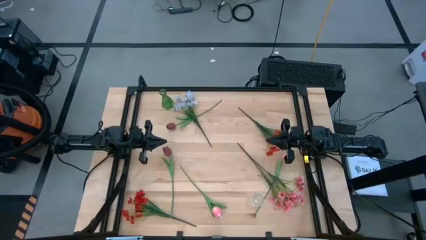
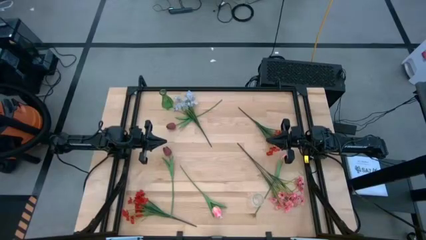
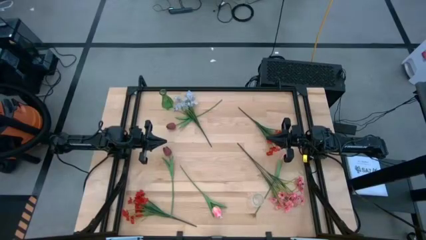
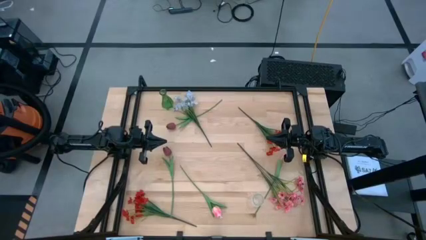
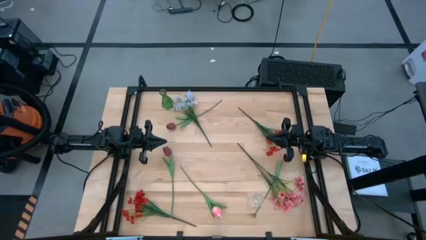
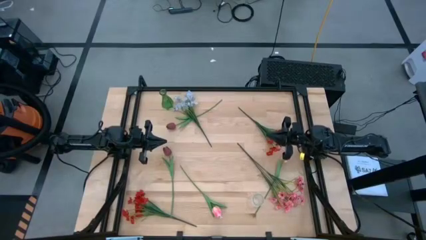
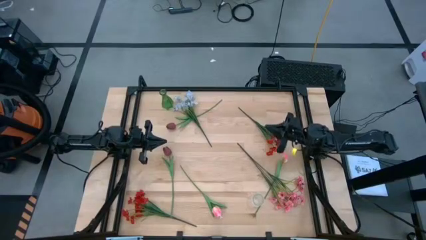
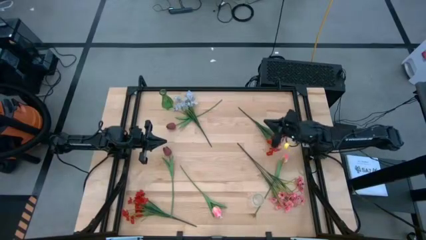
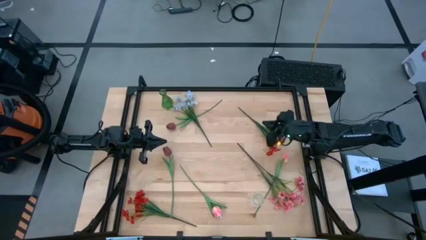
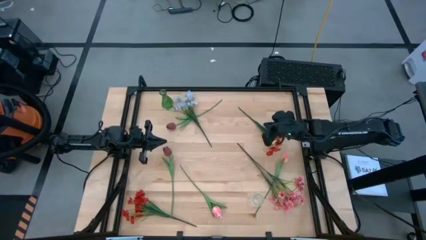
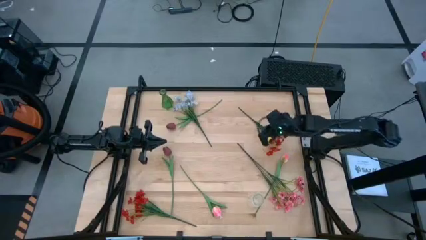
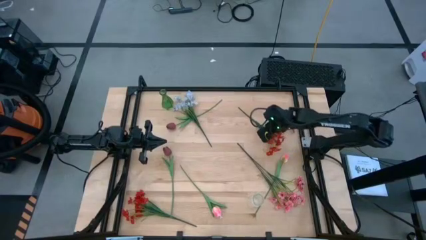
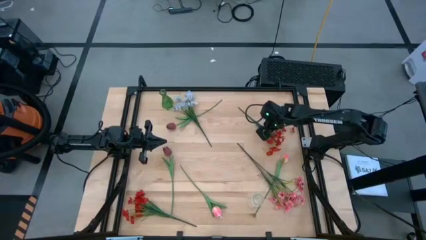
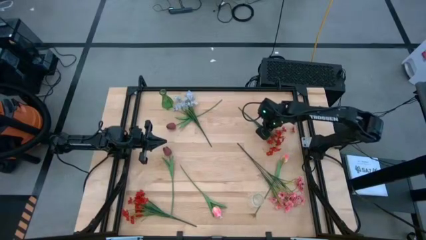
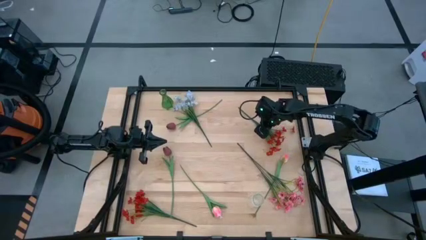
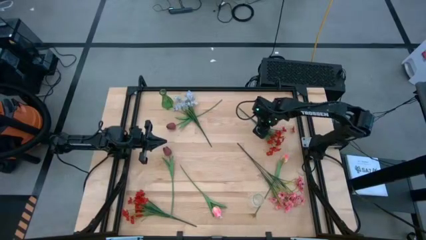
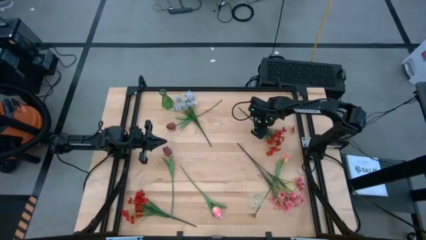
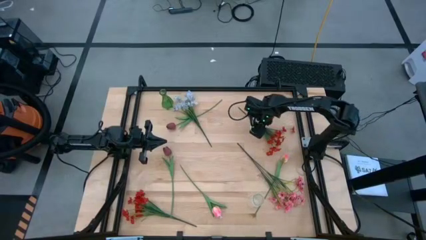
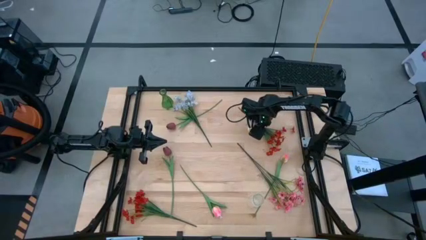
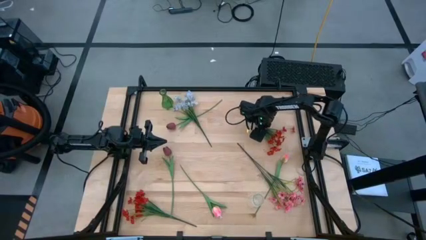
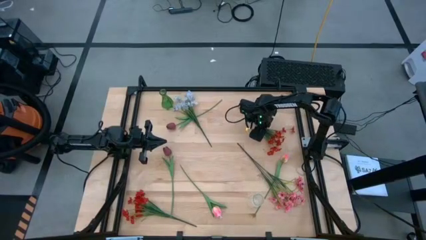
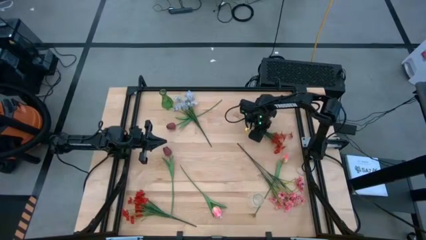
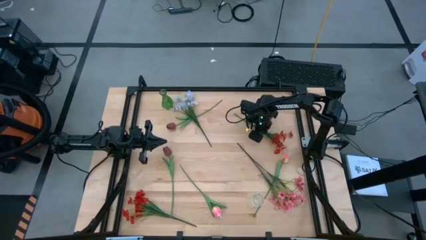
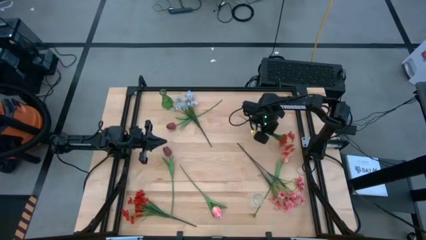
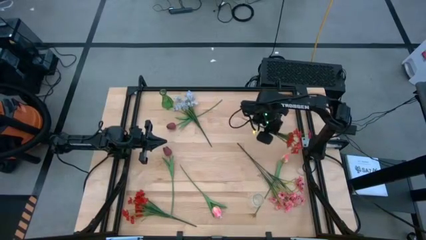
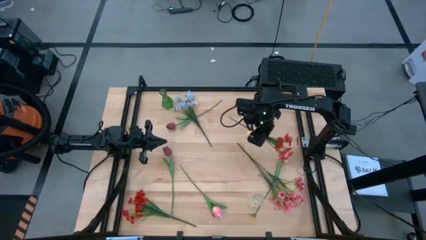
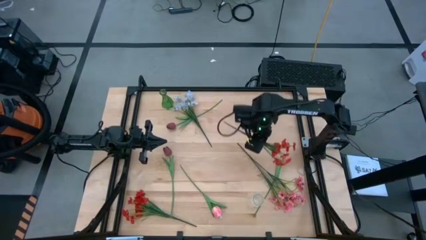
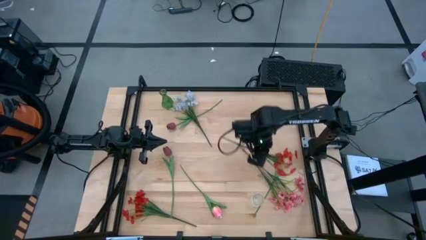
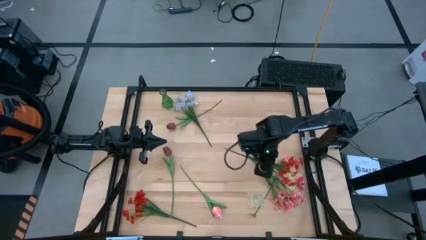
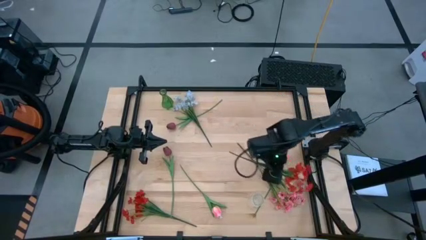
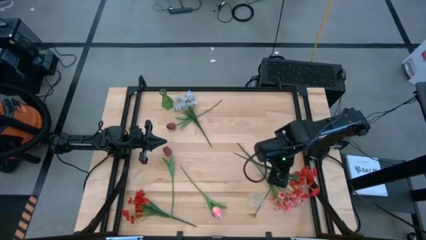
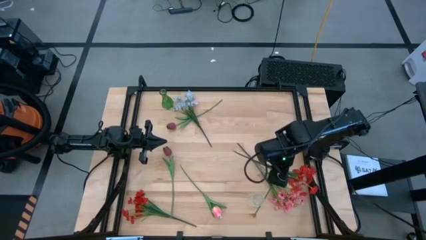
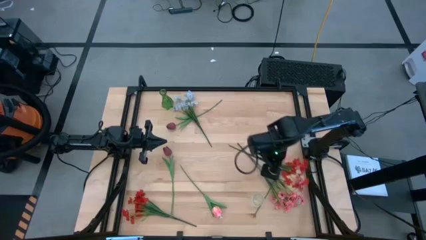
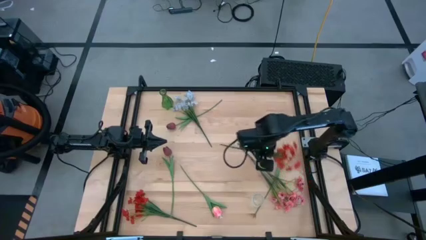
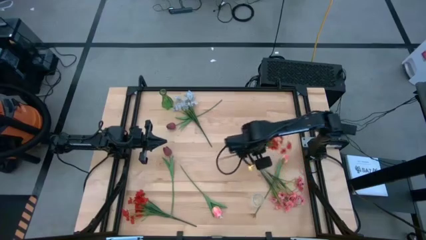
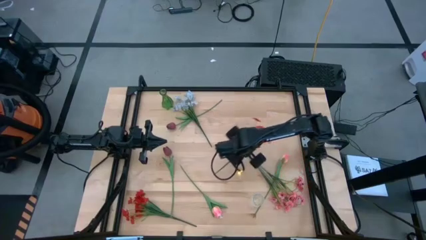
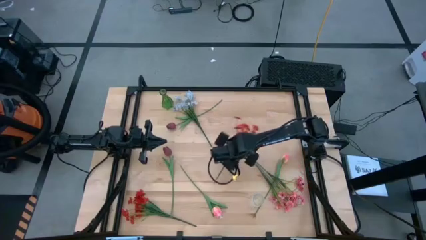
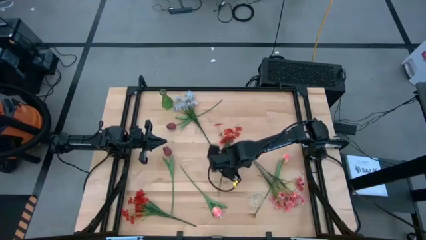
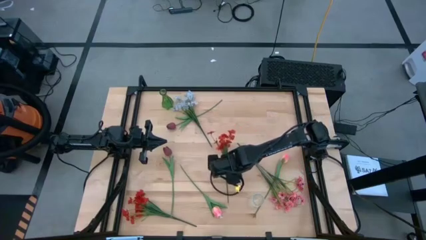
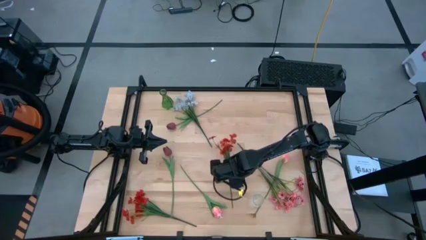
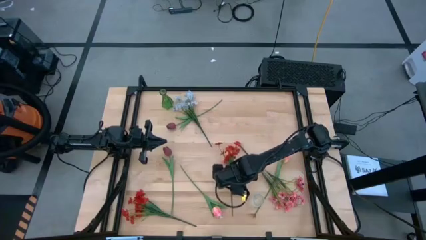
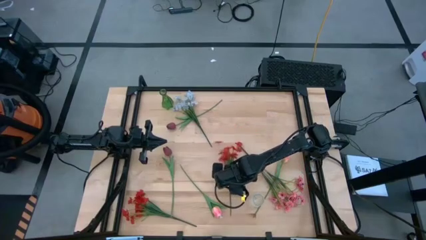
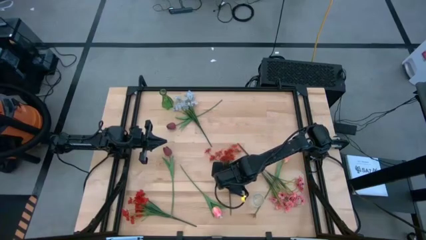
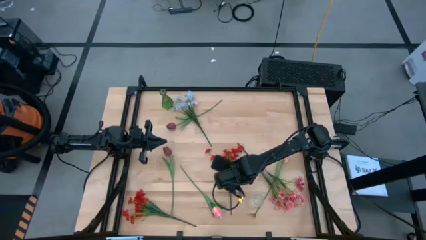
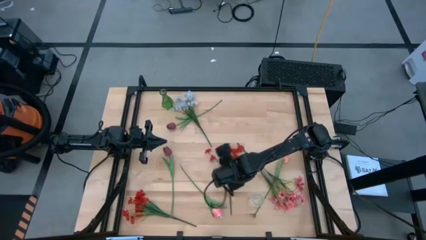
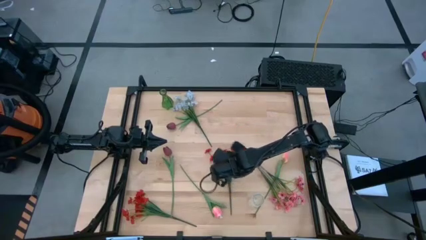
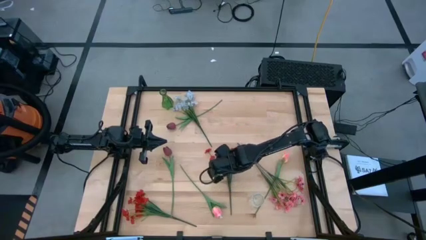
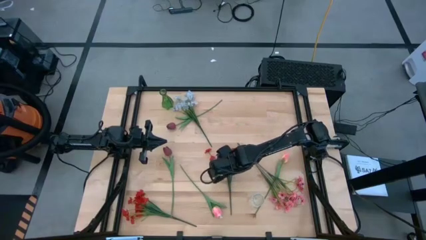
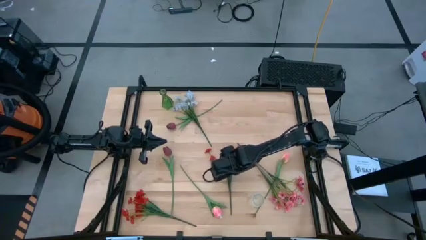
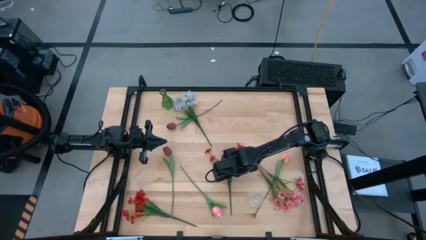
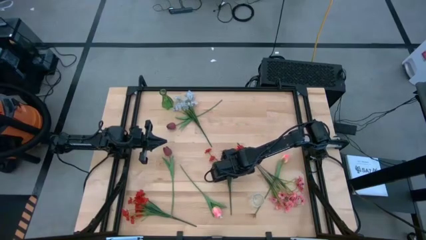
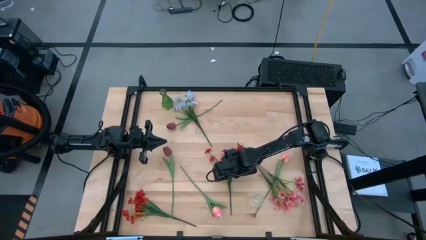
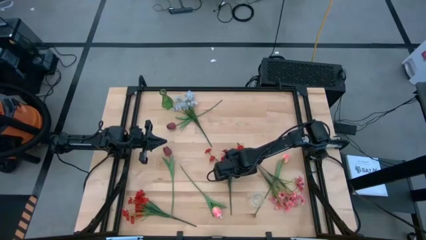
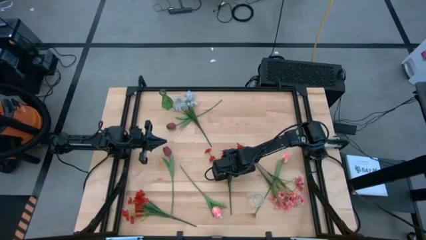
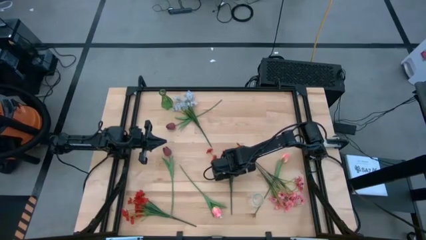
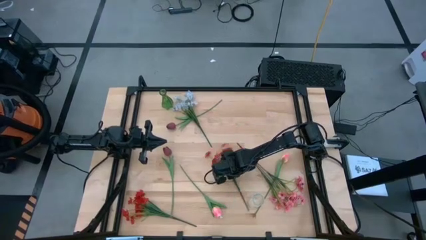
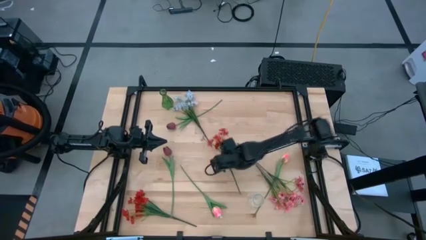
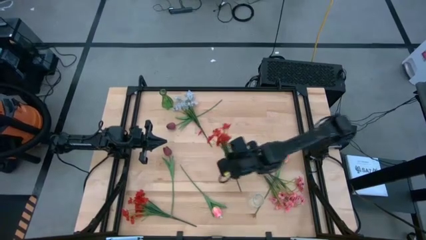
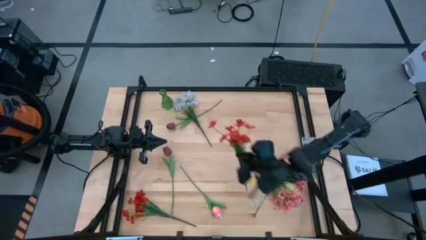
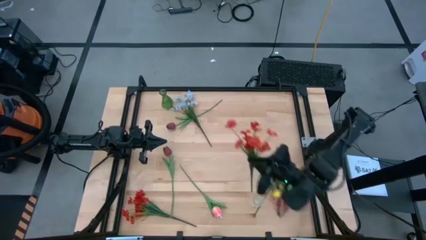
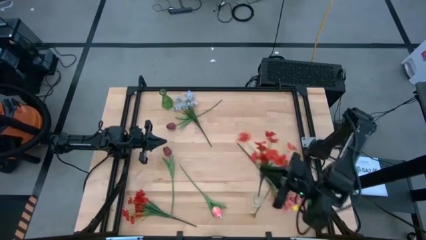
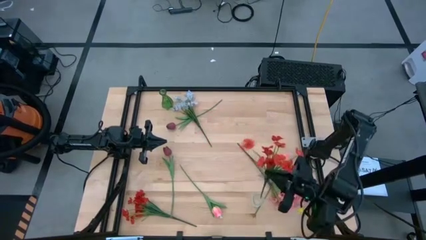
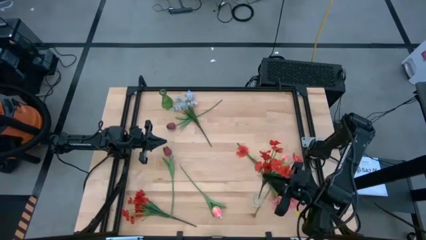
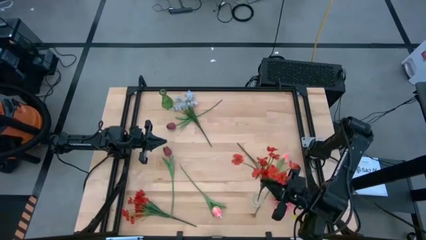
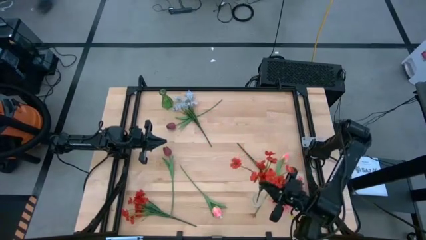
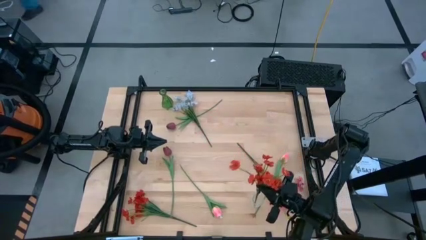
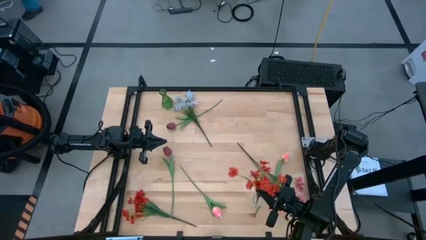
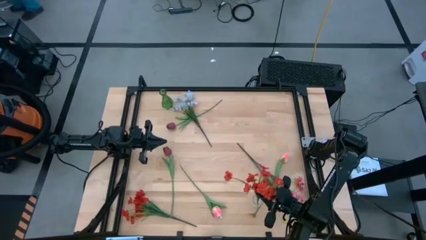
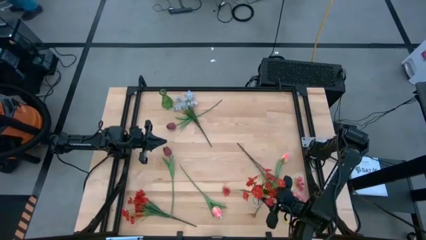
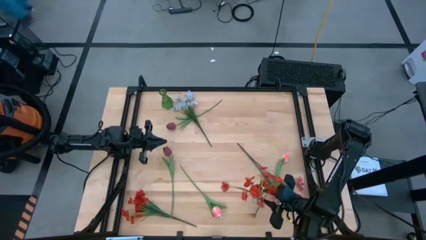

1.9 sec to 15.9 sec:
Task: Sort flowers into vase by color
Put the top orange flowers into the transparent vase
